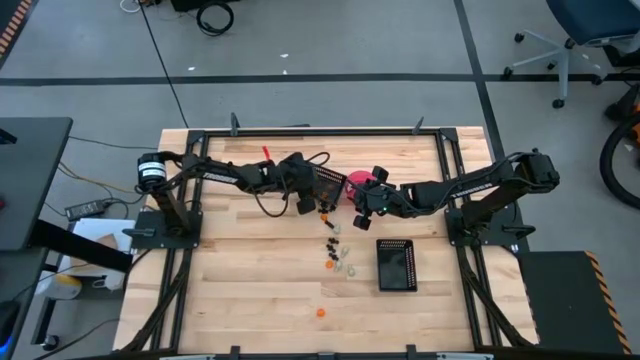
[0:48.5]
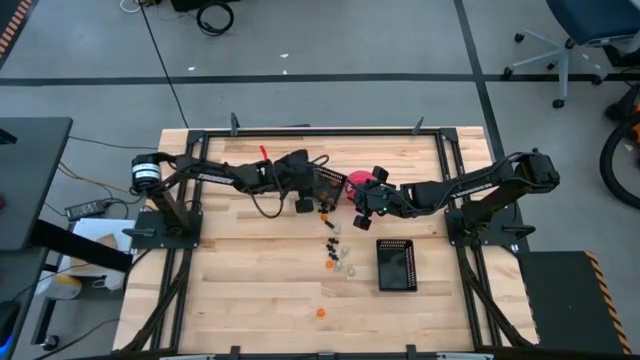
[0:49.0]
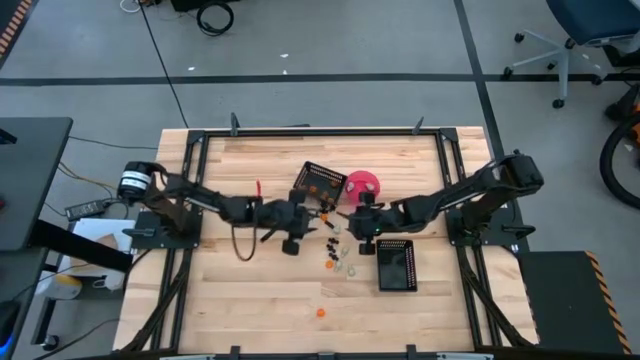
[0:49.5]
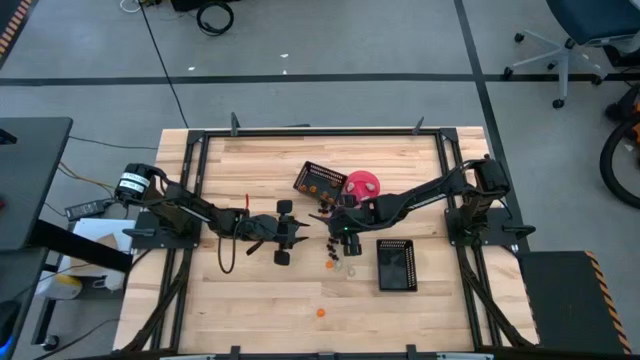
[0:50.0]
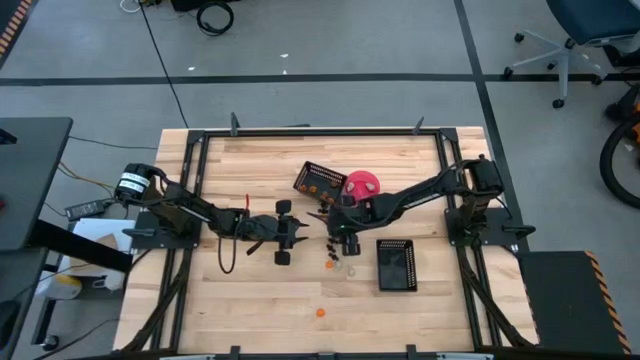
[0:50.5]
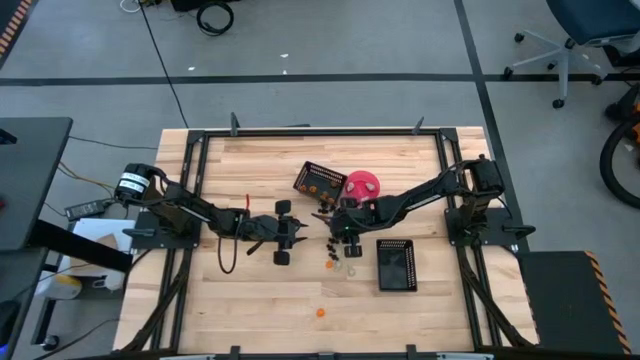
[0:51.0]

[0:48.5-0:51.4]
Task: Sort Halloween decoration
Put the white skull toy into the pink bowl

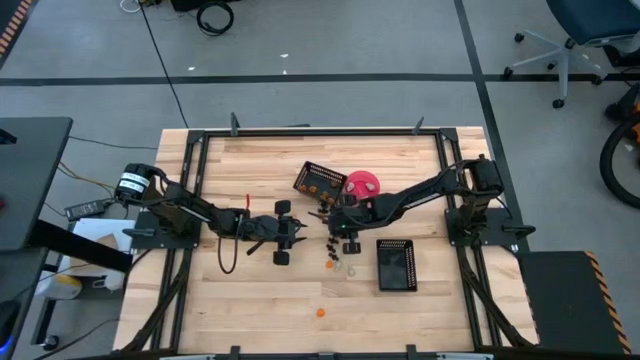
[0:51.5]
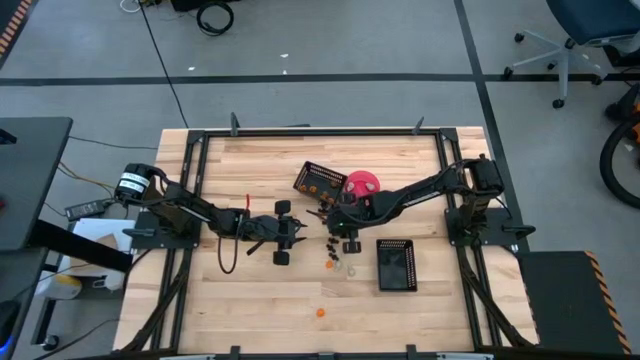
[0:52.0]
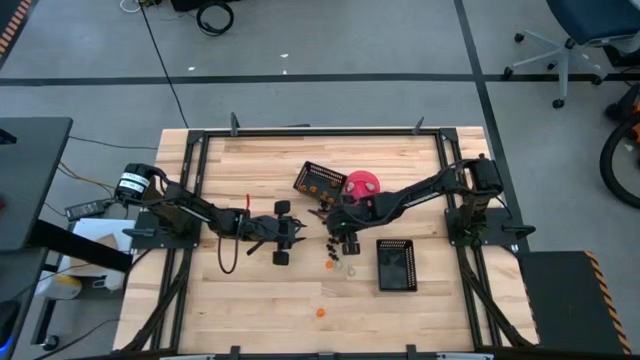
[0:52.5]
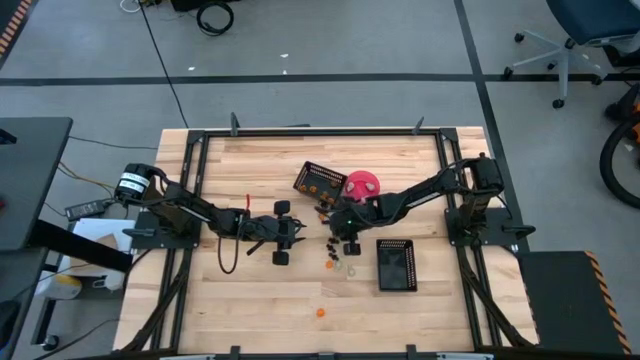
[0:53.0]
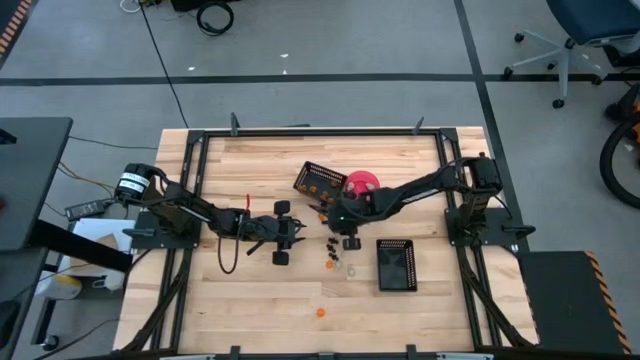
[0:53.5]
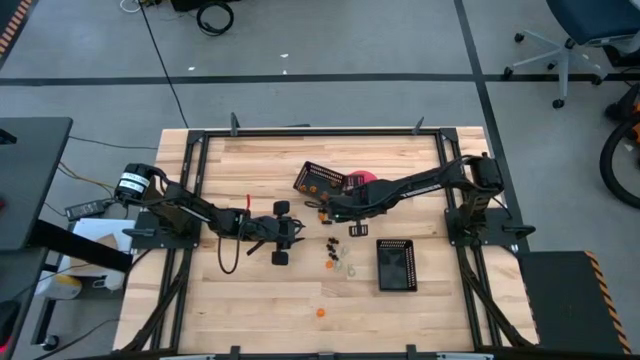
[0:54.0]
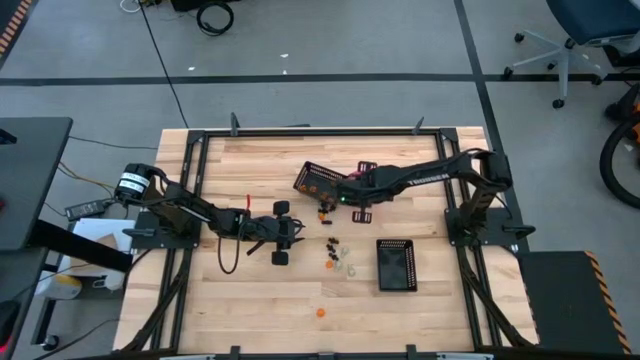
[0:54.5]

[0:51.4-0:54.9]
Put the white skull toy into the pink bowl

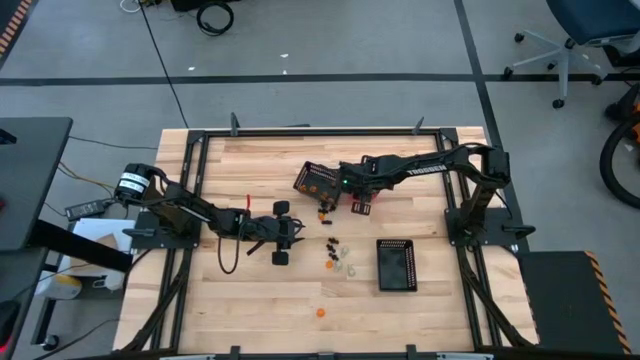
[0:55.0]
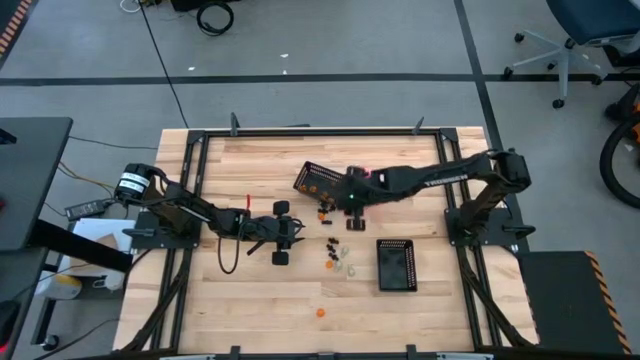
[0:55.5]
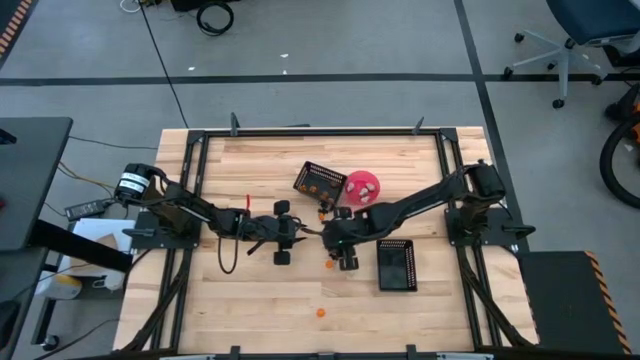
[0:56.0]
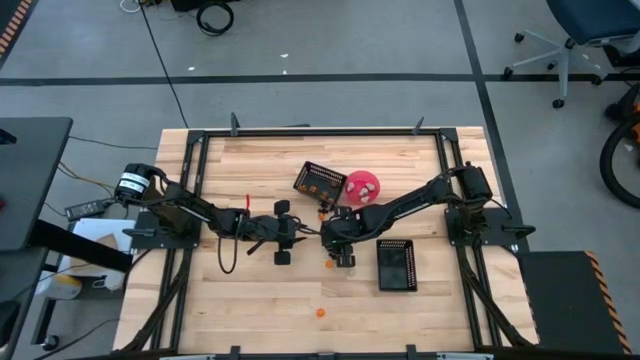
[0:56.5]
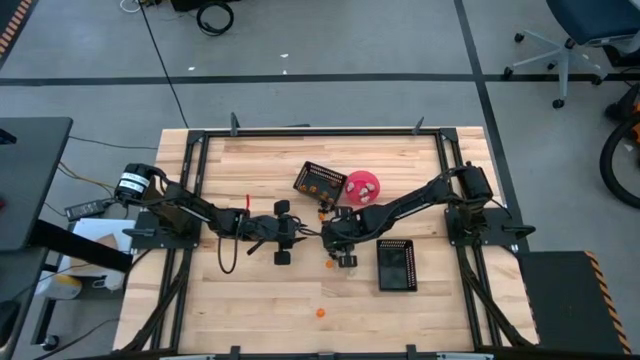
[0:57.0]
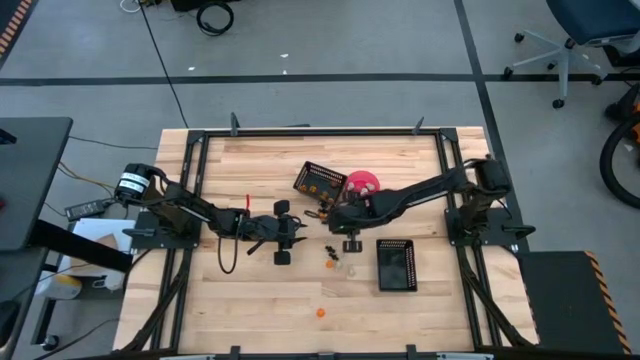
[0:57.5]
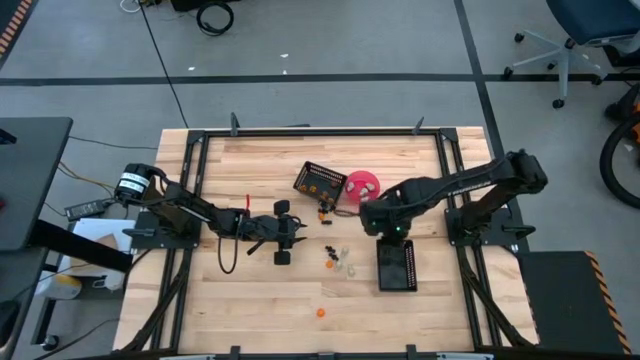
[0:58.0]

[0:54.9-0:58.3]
Put the black skeleton toy into the bottom black bin

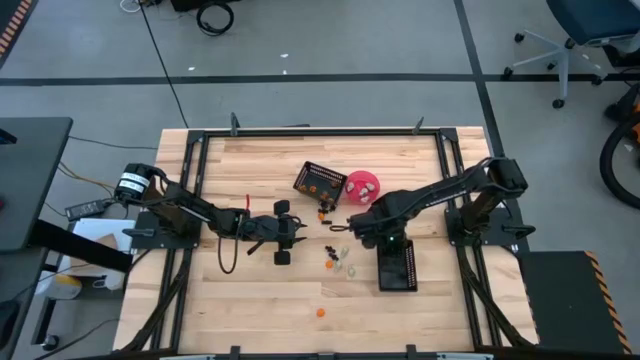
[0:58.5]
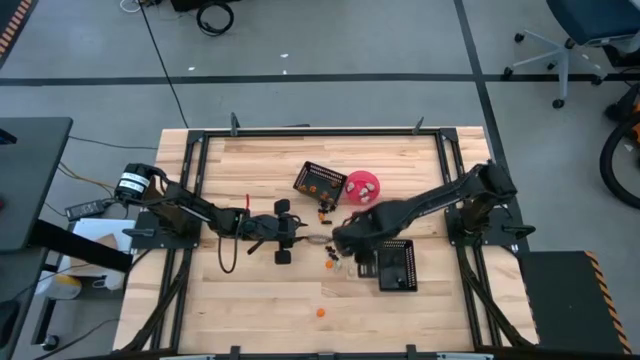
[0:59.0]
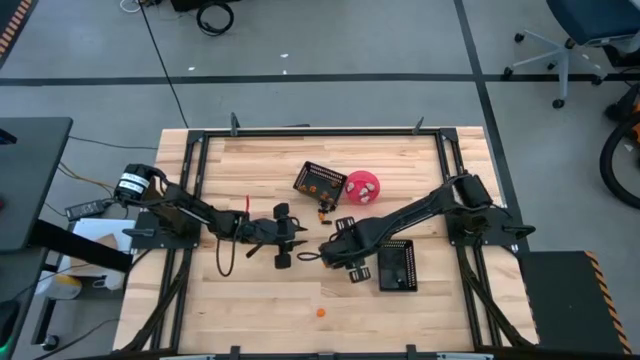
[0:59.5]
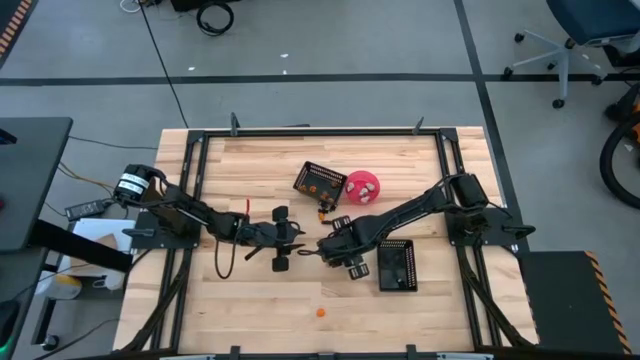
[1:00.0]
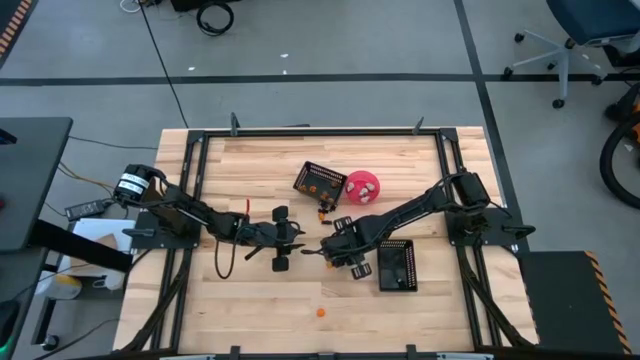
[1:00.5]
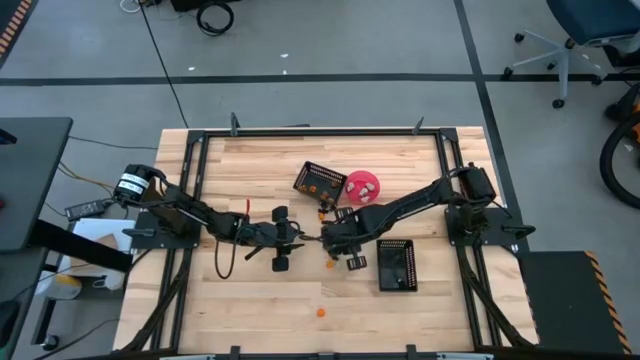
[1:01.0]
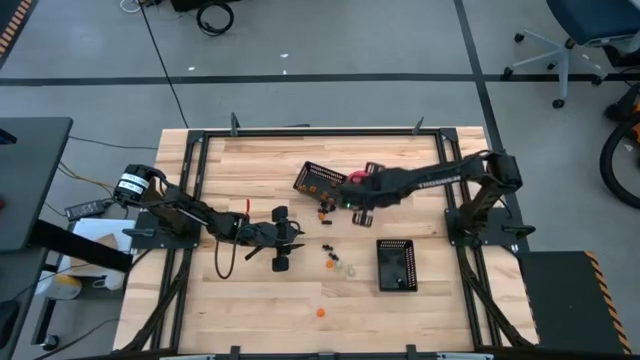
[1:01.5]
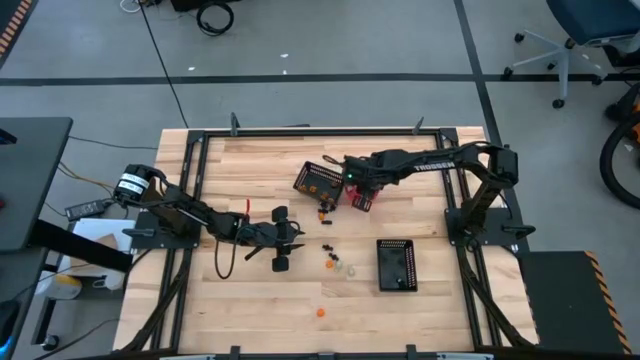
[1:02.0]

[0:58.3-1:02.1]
Put the white skull toy into the pink bowl

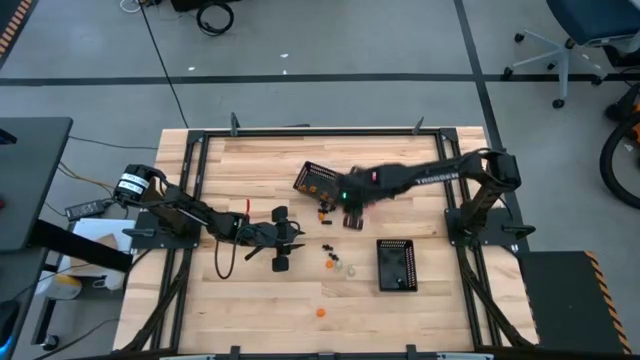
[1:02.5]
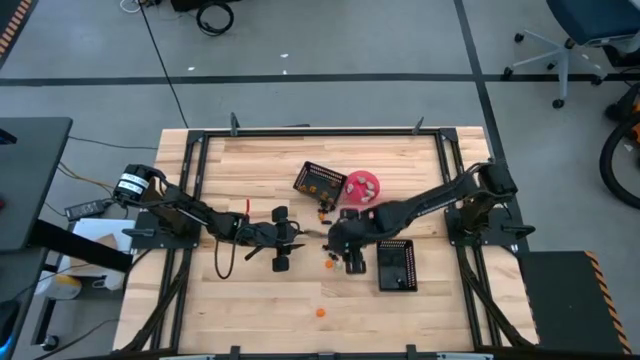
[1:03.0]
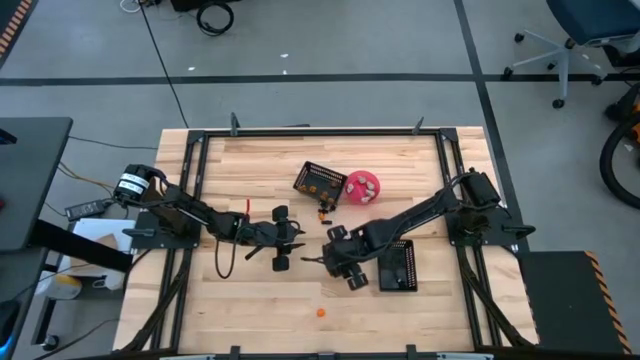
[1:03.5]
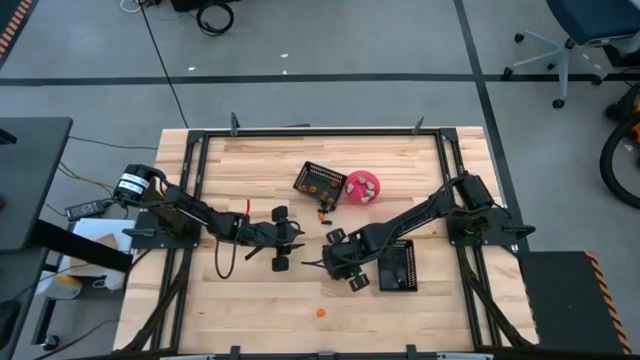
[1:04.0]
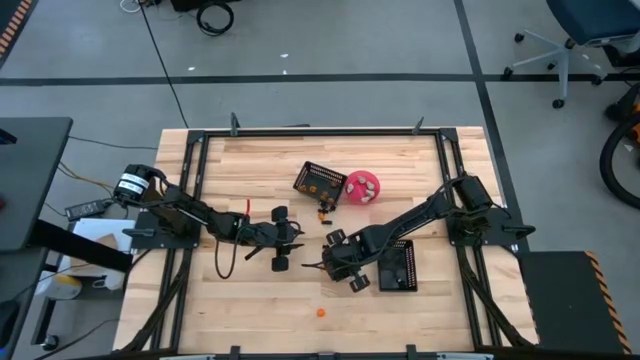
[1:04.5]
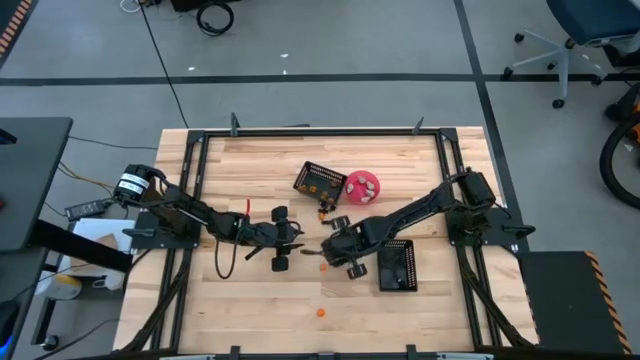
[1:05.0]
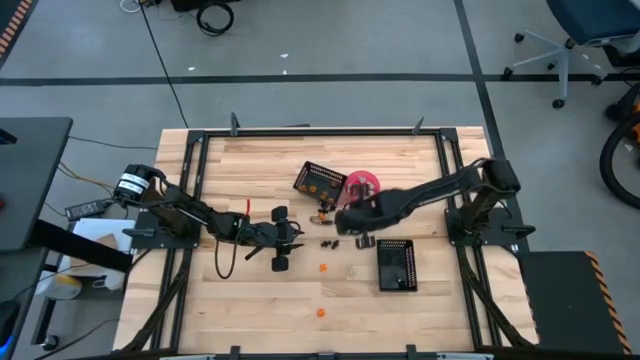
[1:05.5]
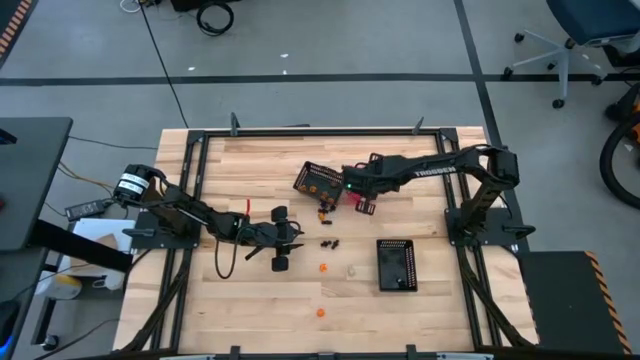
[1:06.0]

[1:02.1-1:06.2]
Put the white skull toy into the pink bowl

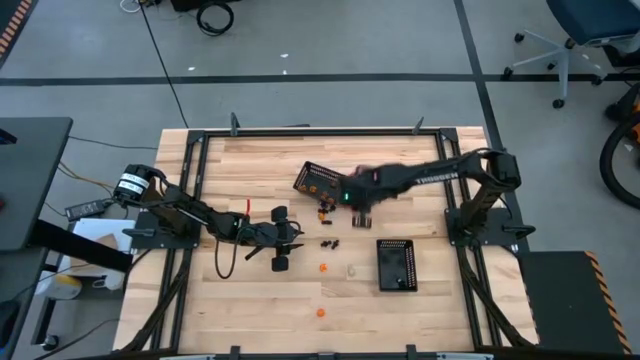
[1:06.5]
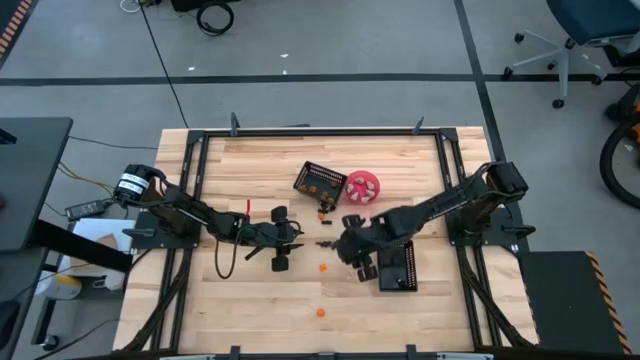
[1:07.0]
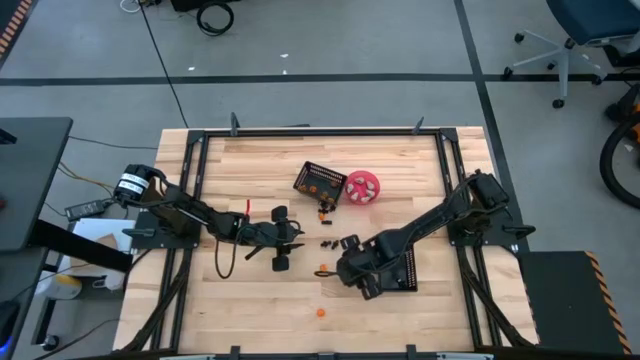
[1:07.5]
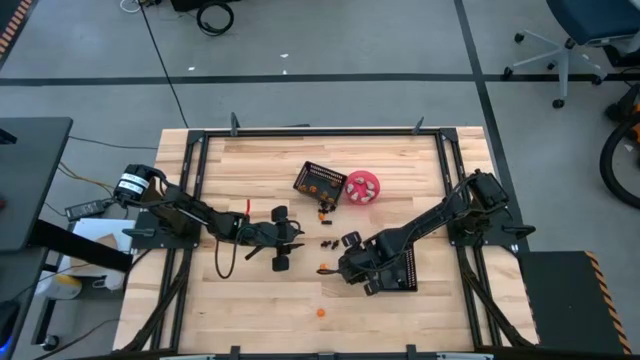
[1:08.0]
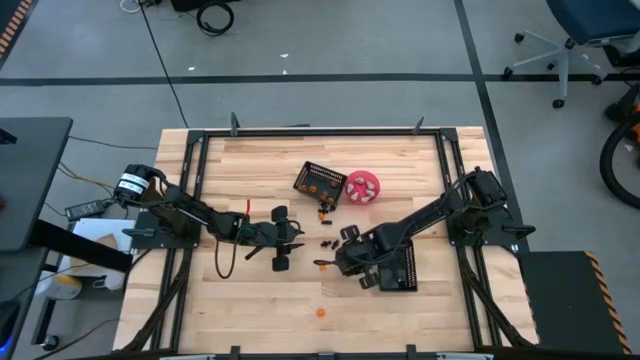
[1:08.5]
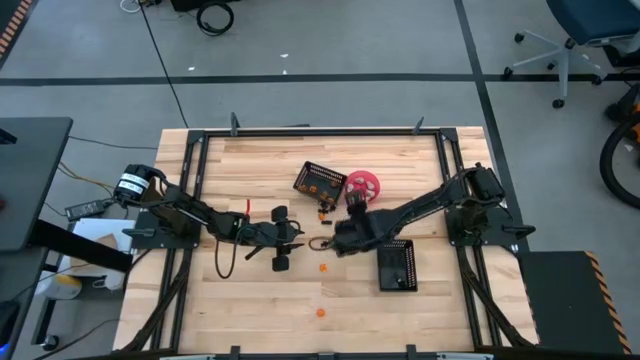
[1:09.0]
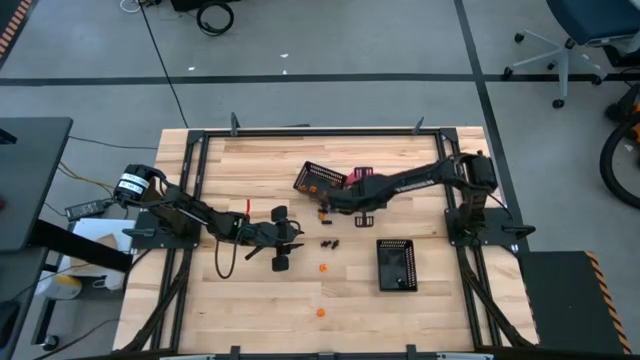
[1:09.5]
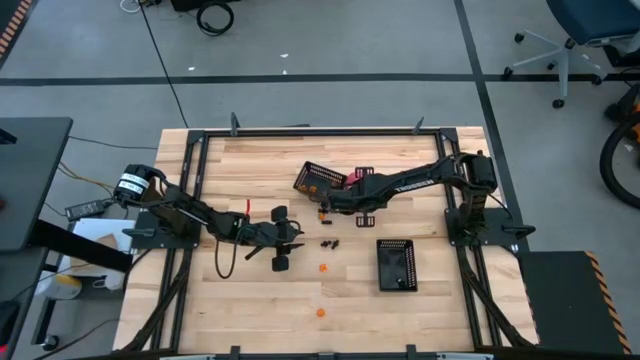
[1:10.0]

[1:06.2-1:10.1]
Put the white skull toy into the pink bowl
